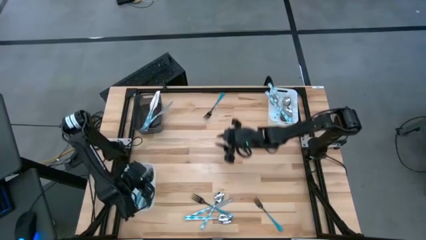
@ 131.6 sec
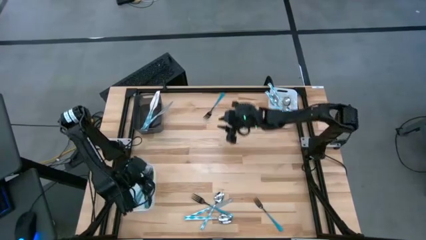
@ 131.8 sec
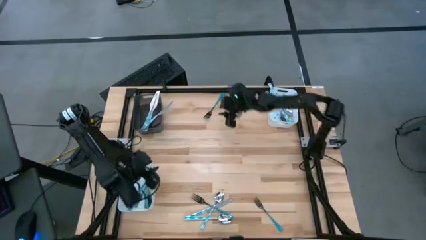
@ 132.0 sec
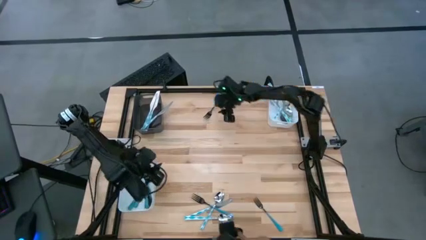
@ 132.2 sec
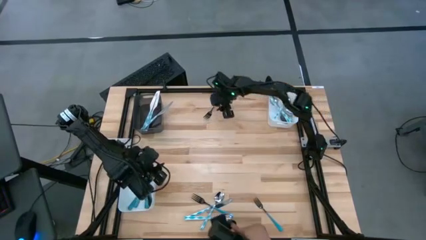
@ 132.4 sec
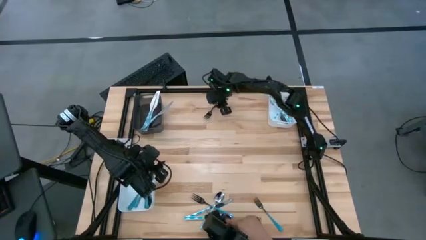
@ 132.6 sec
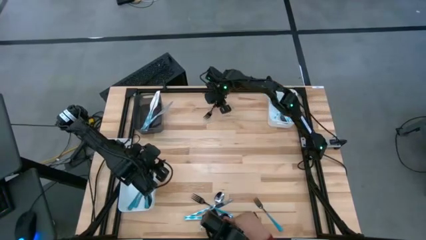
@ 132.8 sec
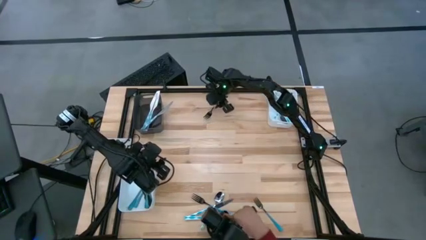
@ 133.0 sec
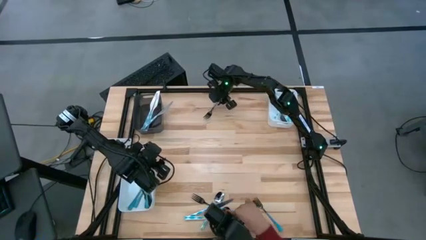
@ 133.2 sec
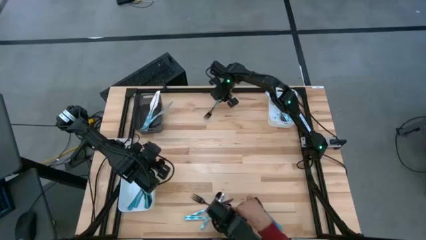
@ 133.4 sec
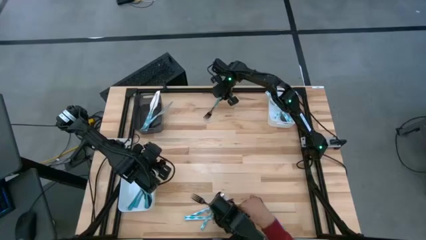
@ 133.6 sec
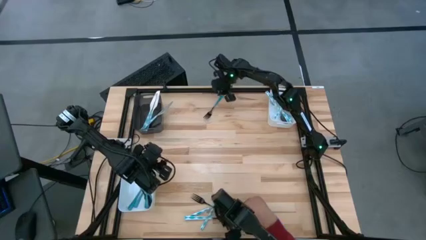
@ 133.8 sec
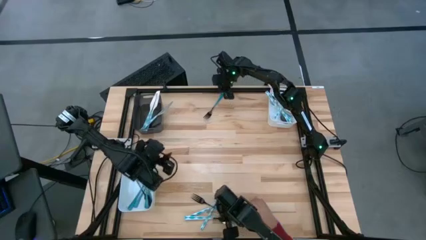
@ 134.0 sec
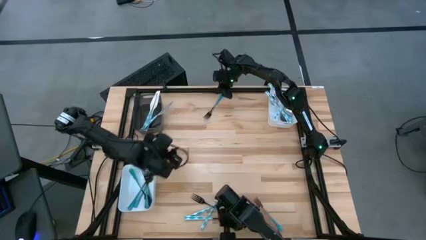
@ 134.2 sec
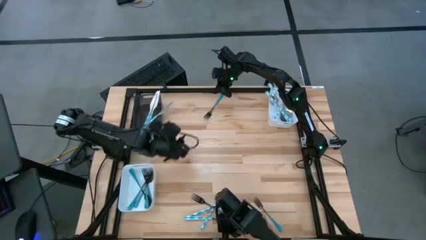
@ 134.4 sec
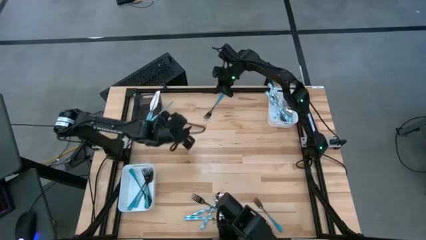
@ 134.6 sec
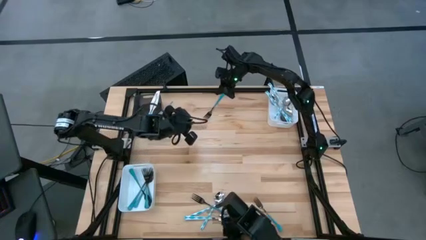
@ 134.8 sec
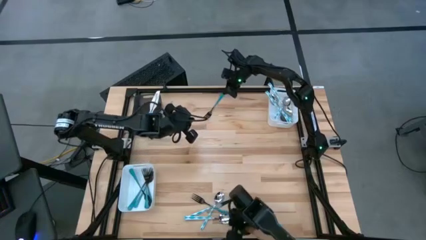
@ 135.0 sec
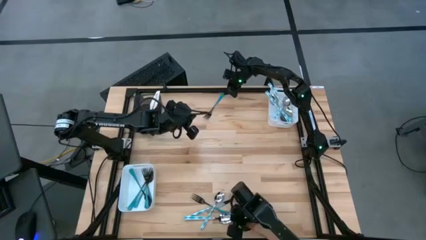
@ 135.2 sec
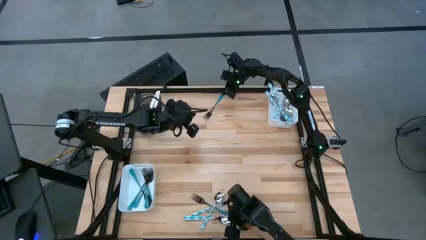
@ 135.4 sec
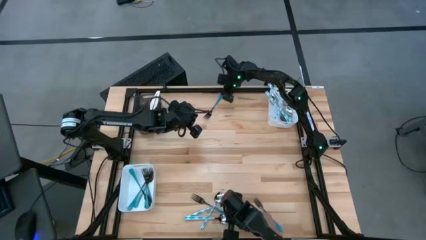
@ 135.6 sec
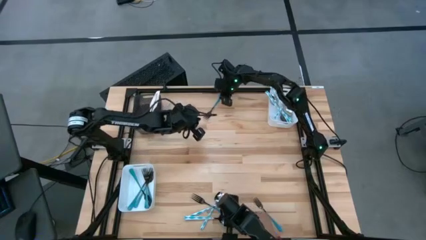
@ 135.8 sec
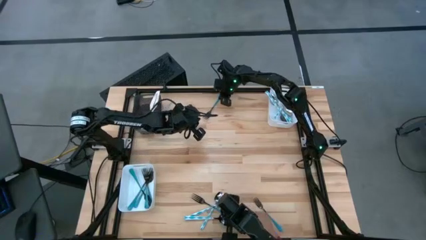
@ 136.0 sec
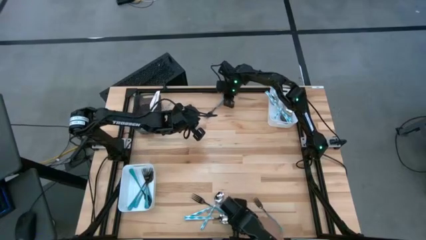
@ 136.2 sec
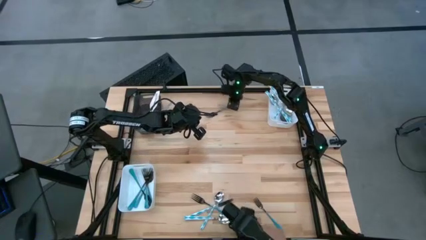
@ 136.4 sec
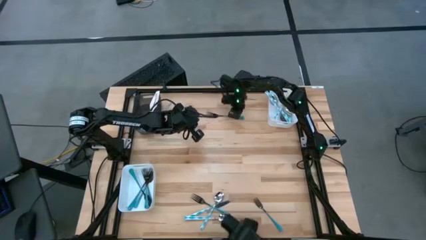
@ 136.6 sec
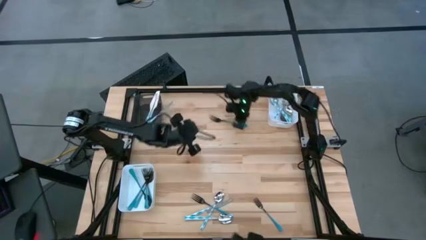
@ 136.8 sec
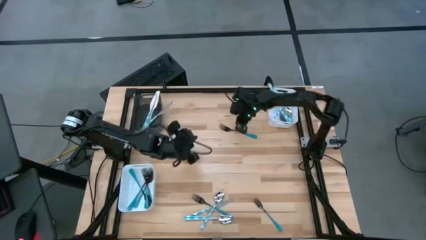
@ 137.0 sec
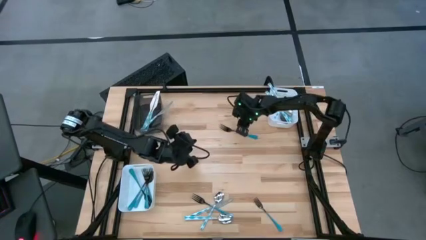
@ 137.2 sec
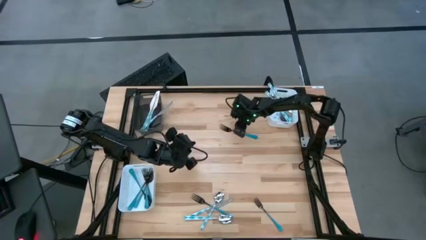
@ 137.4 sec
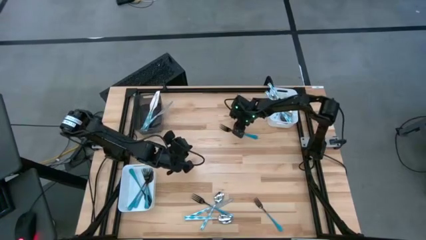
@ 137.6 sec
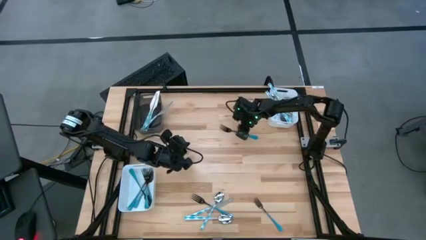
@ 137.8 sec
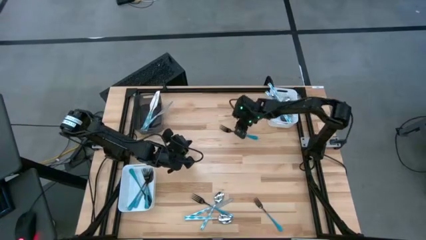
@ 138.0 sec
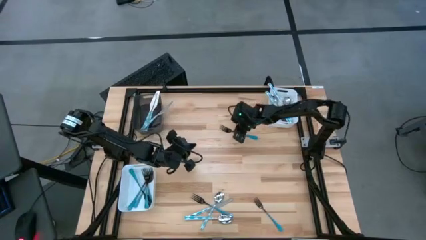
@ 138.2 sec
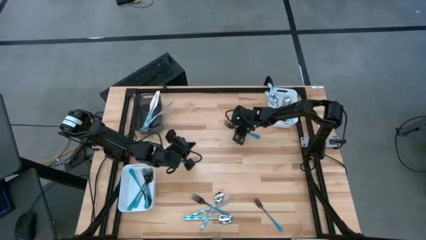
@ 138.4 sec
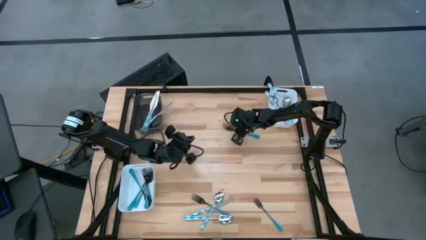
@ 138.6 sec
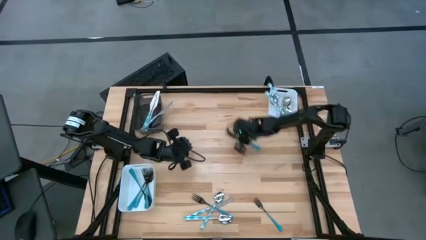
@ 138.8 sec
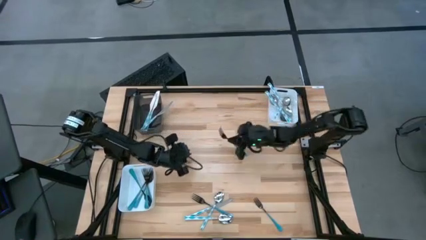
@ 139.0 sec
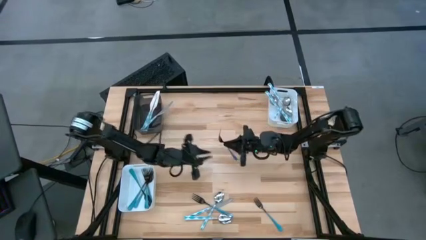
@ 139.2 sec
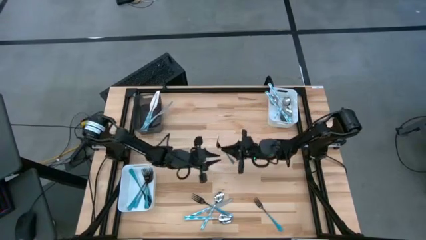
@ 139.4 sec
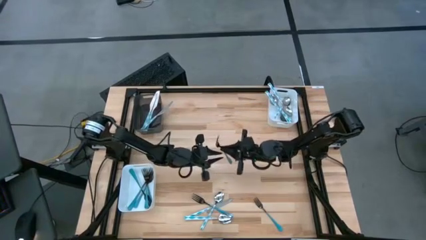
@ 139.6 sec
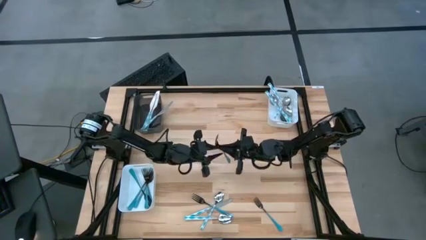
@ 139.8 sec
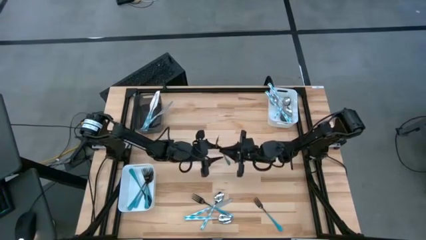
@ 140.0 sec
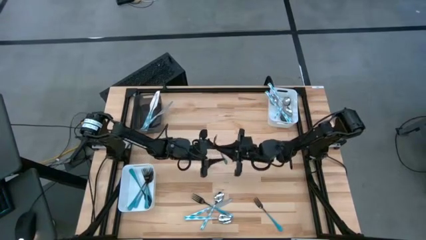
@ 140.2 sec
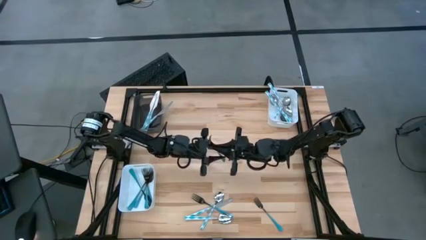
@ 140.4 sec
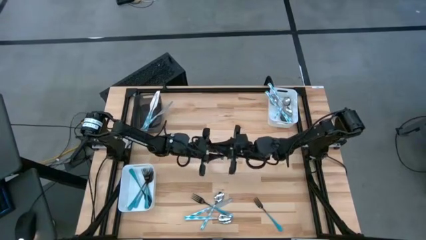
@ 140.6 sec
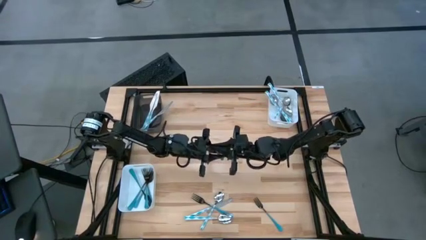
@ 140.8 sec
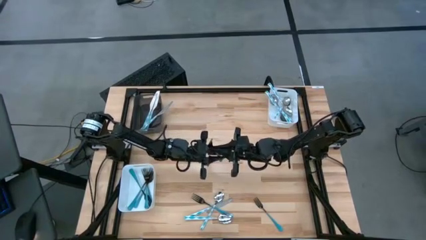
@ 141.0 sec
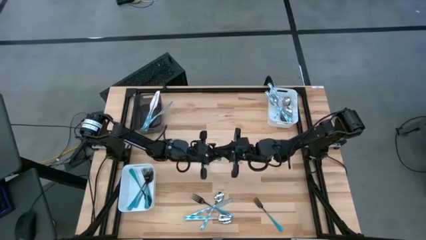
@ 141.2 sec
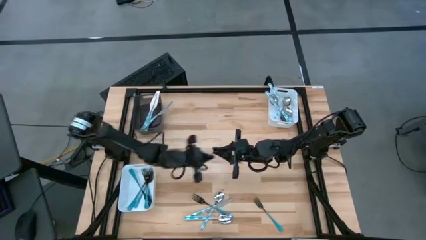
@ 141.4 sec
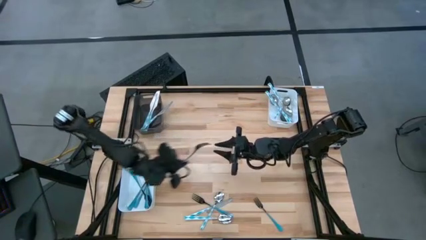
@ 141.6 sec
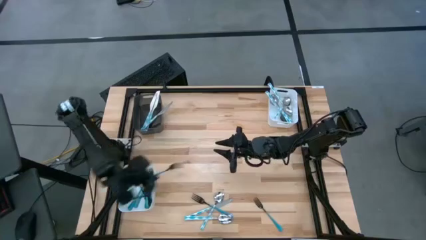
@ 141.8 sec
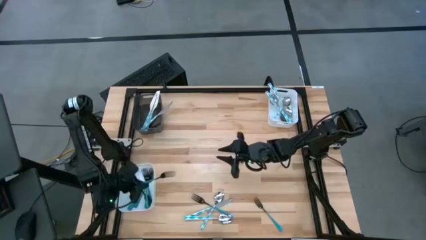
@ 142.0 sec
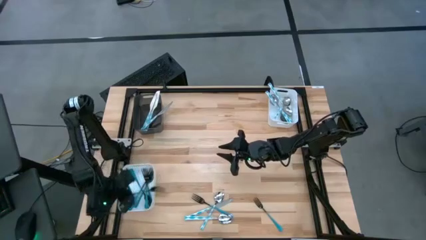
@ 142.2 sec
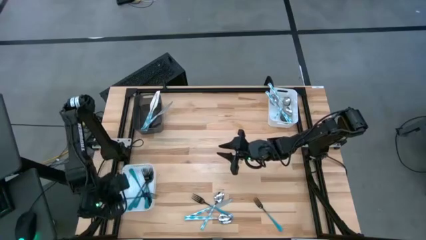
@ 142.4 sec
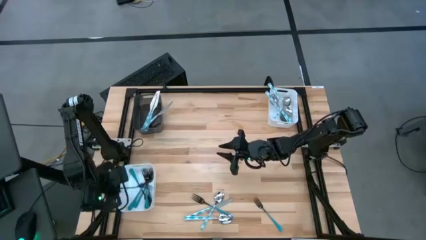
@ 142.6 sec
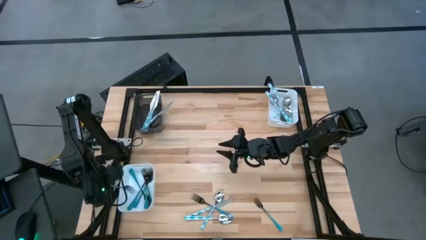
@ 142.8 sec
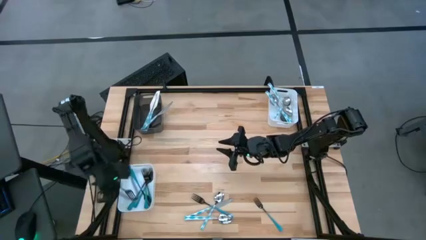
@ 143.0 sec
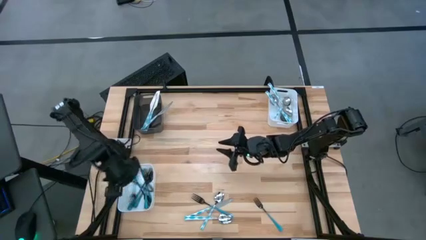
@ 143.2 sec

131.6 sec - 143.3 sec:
Task: Sort silverware by color (type)
Put the blue fork into the left white bin

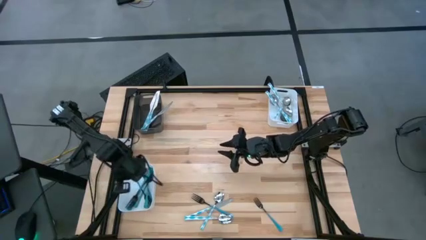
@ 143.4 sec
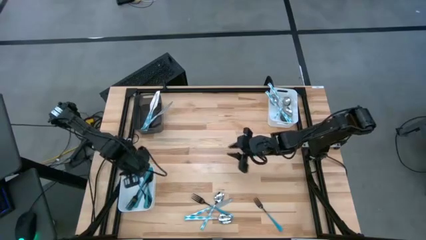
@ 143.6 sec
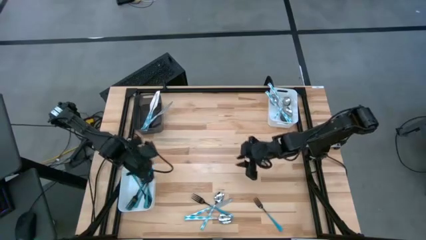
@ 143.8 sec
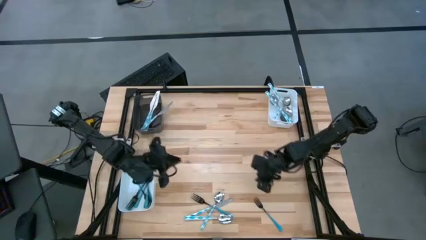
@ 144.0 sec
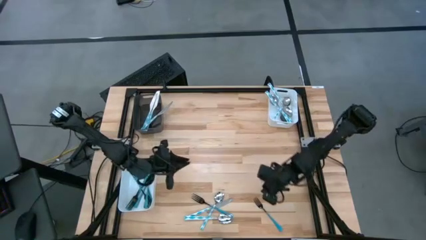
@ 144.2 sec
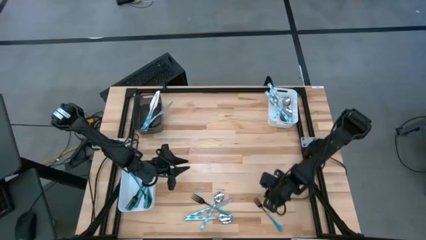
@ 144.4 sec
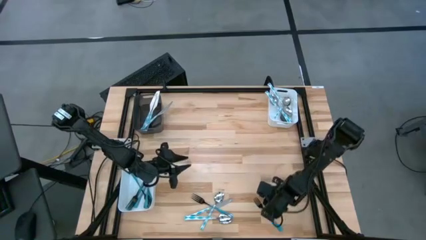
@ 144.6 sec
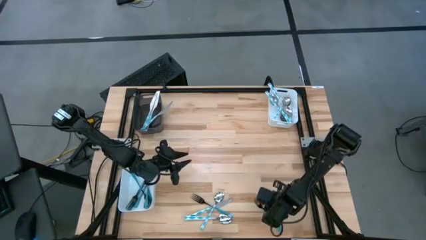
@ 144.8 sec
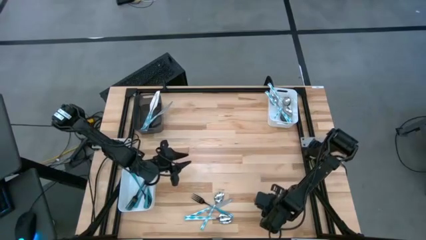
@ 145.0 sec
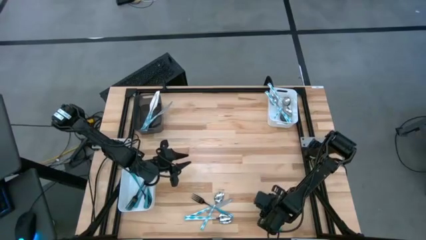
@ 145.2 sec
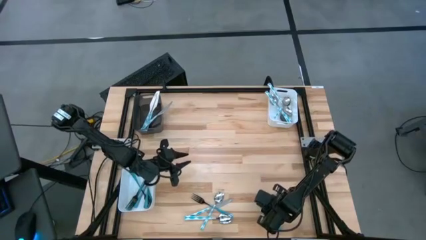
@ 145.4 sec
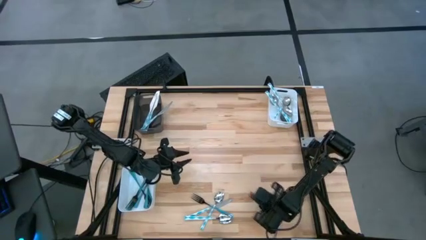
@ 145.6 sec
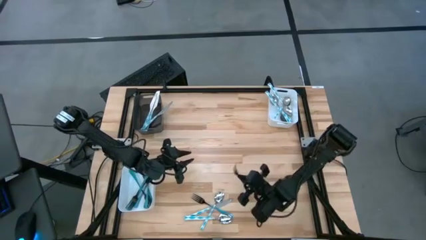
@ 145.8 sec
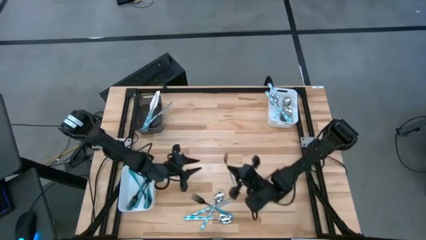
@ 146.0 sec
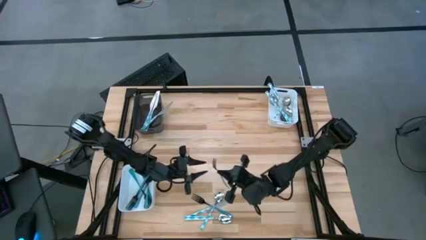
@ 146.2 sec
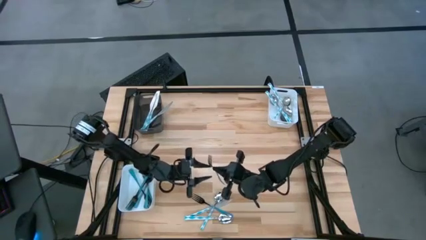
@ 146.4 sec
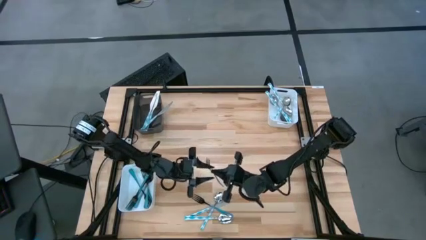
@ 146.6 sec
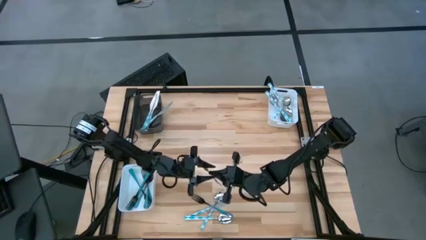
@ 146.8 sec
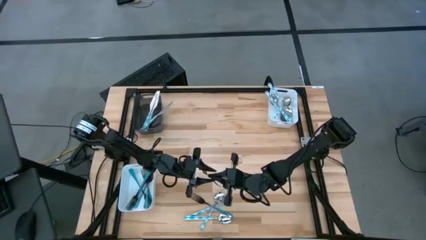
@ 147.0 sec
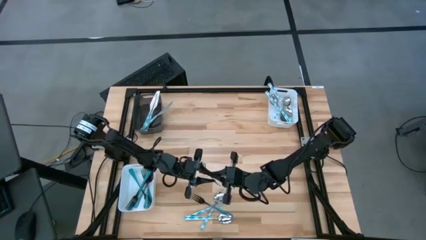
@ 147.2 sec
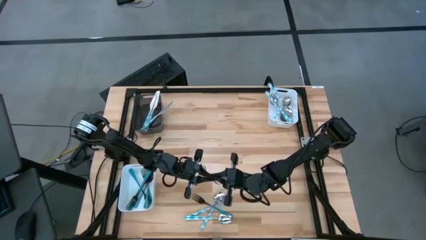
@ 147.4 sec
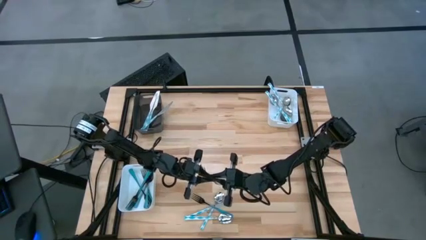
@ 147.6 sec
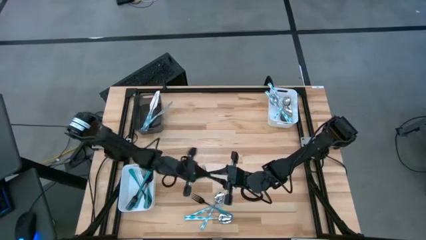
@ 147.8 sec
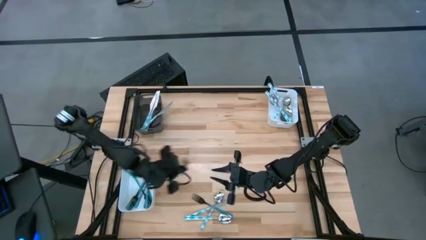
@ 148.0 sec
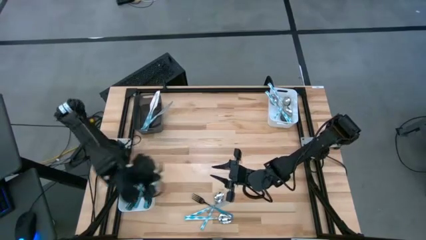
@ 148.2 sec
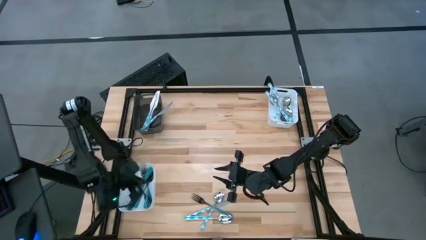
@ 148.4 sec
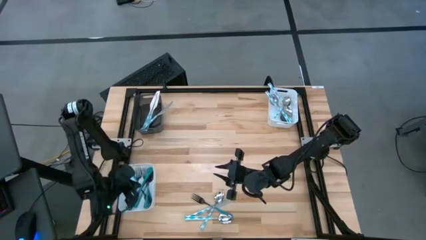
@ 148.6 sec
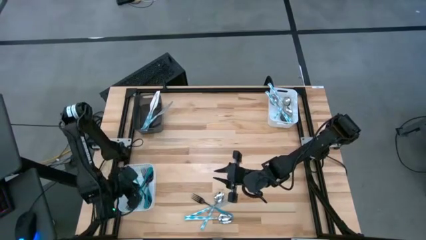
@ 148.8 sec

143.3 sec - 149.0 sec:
Put the blue fork into the left white bin
